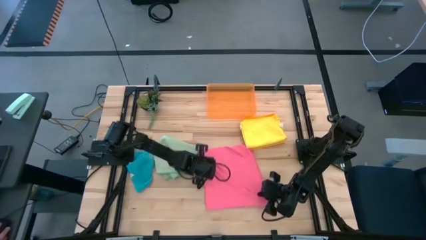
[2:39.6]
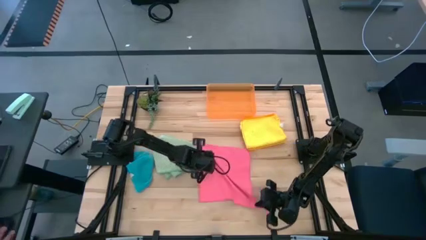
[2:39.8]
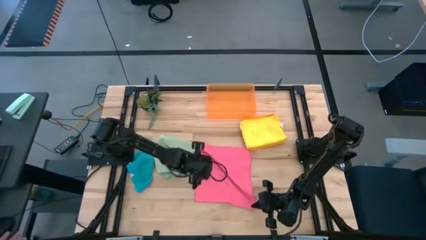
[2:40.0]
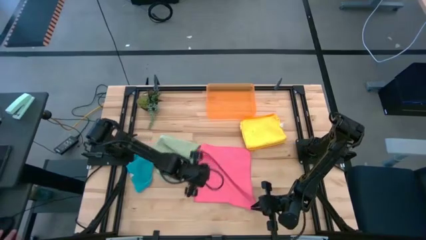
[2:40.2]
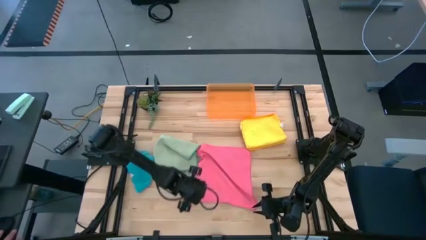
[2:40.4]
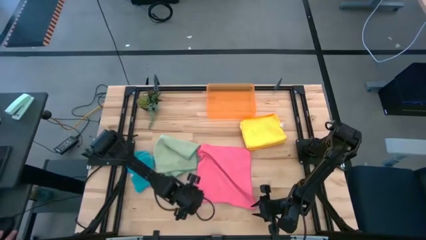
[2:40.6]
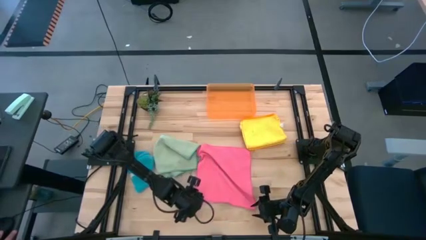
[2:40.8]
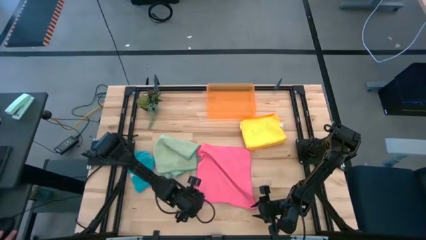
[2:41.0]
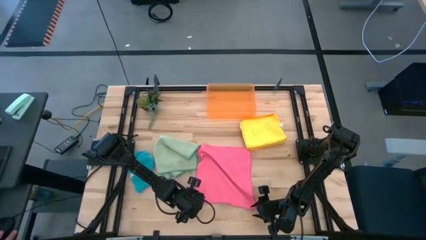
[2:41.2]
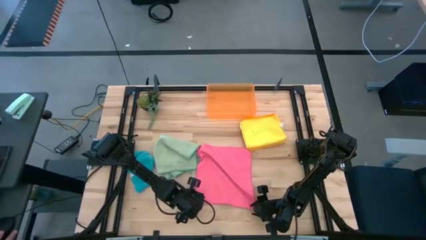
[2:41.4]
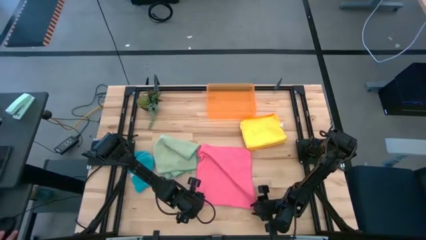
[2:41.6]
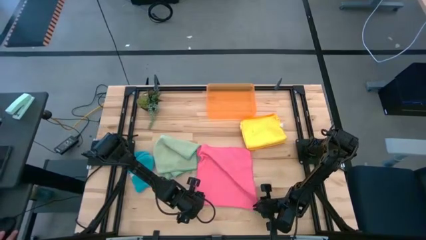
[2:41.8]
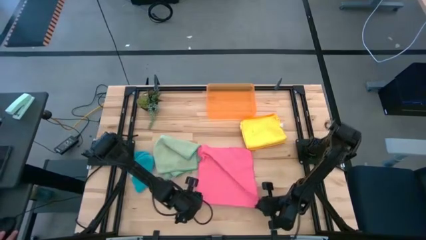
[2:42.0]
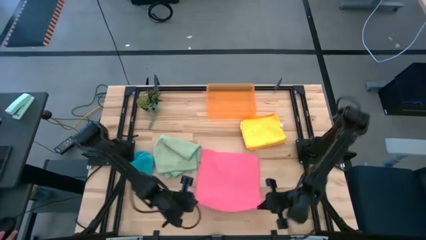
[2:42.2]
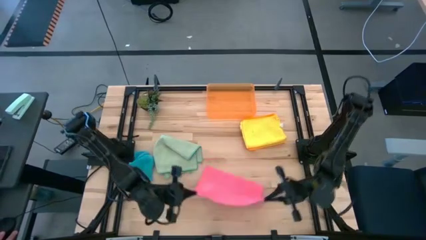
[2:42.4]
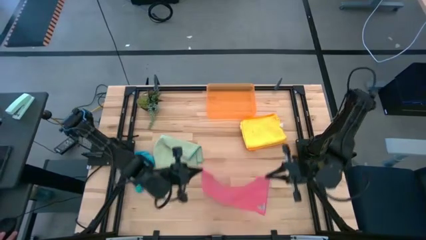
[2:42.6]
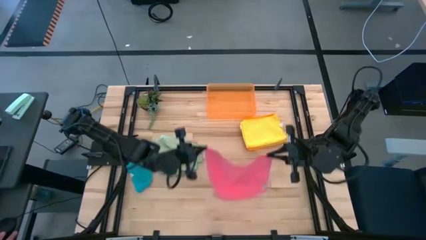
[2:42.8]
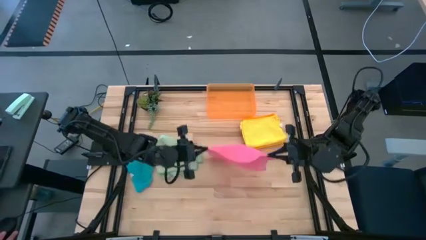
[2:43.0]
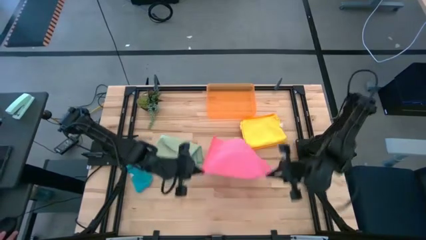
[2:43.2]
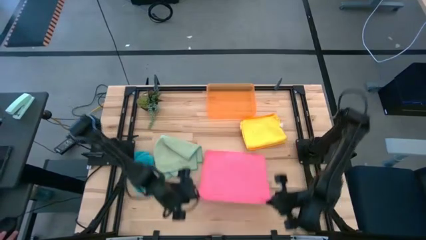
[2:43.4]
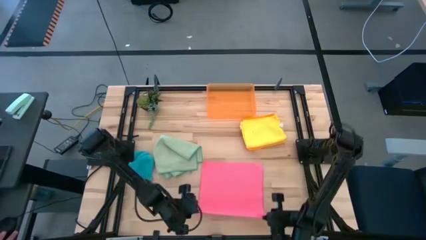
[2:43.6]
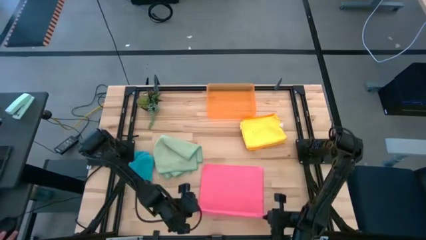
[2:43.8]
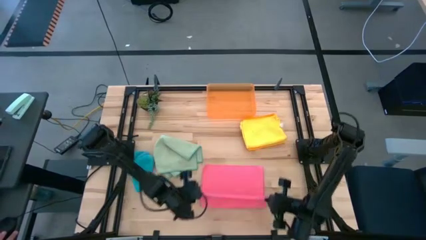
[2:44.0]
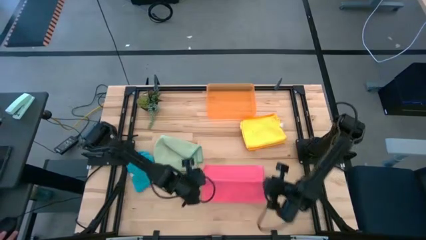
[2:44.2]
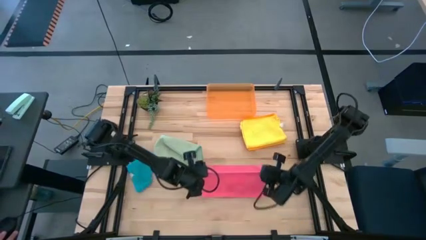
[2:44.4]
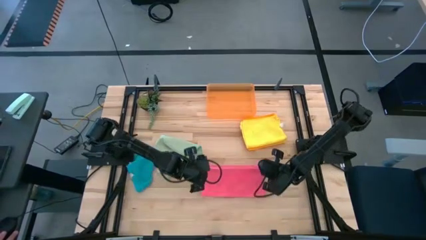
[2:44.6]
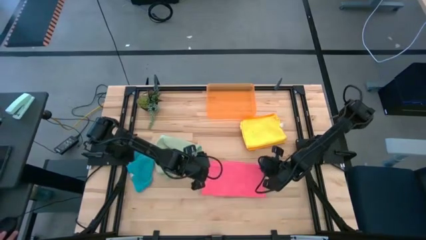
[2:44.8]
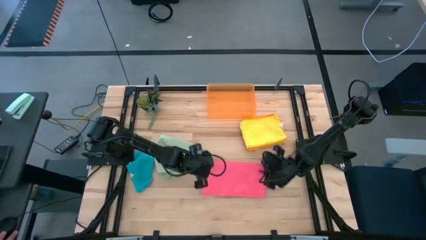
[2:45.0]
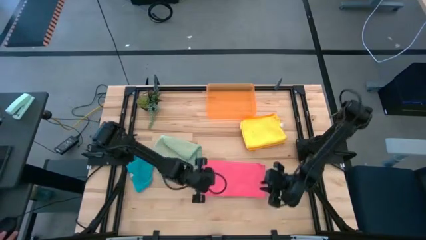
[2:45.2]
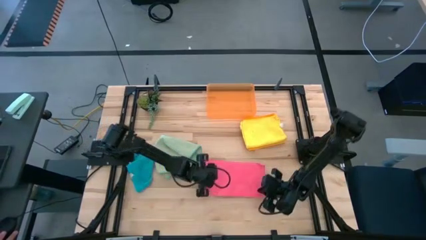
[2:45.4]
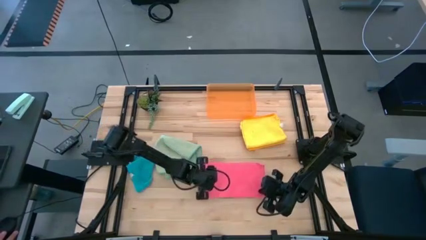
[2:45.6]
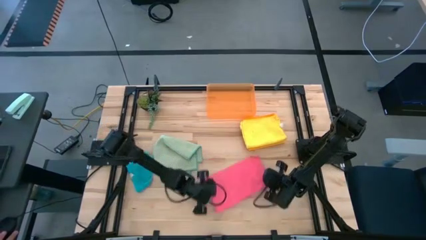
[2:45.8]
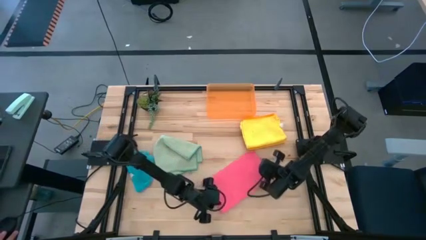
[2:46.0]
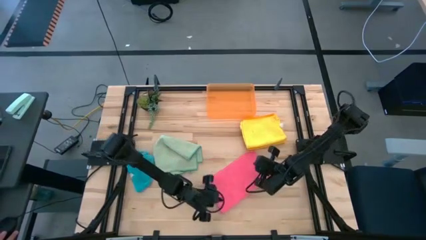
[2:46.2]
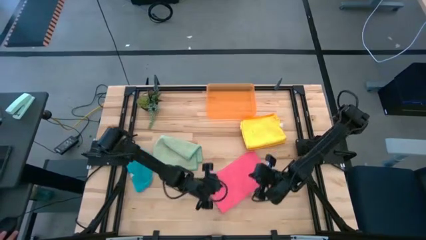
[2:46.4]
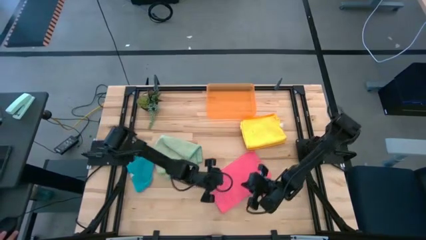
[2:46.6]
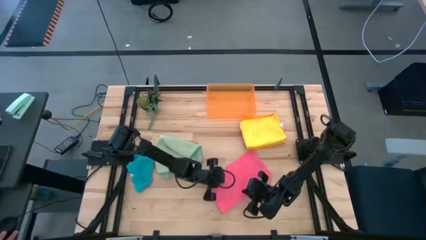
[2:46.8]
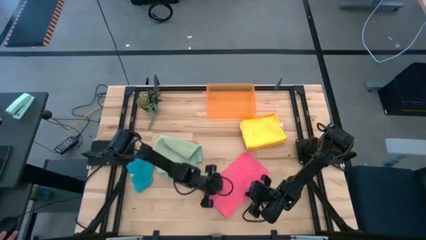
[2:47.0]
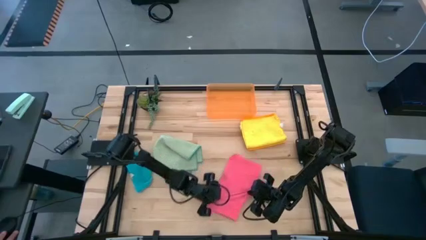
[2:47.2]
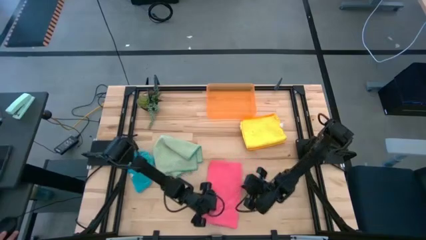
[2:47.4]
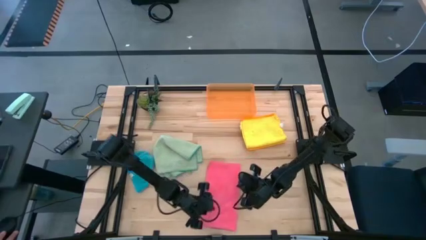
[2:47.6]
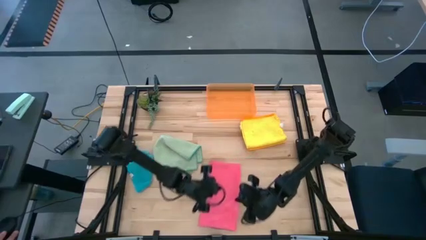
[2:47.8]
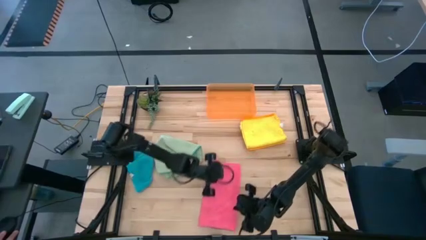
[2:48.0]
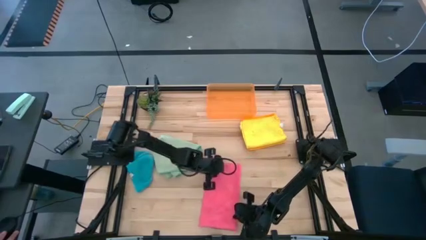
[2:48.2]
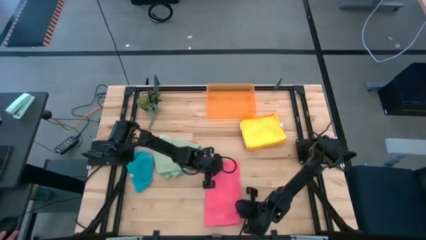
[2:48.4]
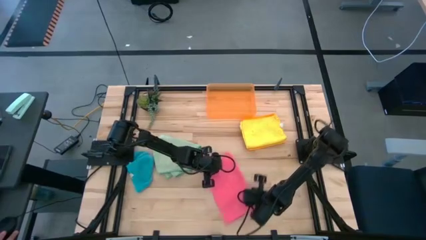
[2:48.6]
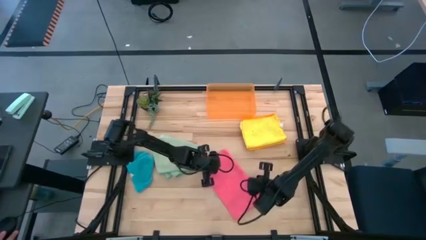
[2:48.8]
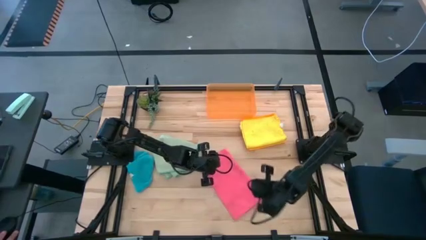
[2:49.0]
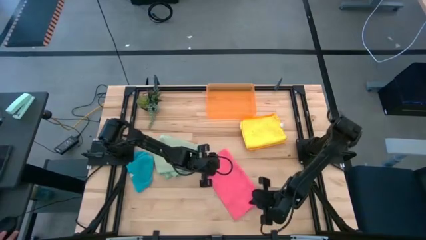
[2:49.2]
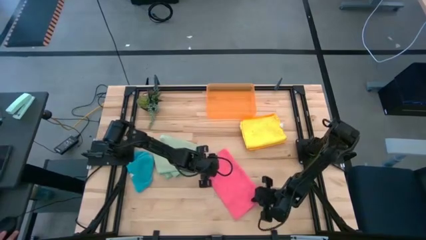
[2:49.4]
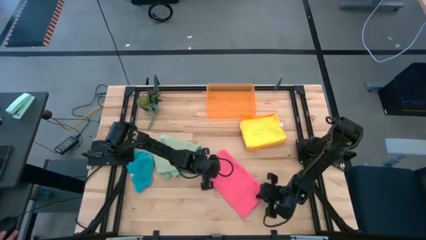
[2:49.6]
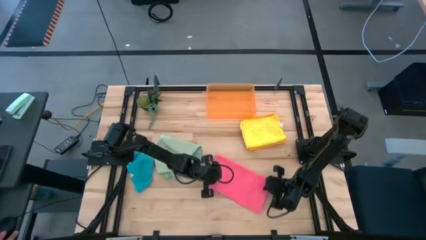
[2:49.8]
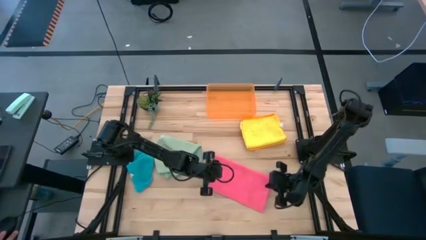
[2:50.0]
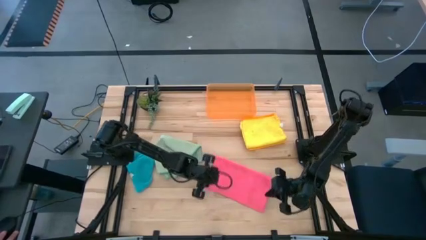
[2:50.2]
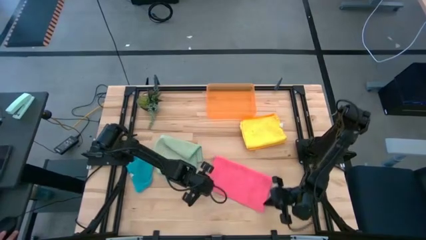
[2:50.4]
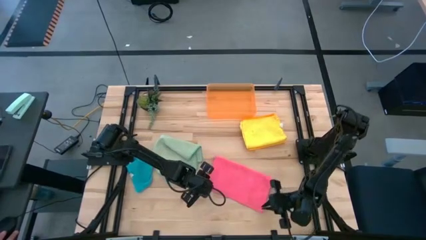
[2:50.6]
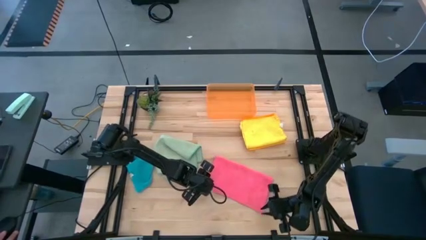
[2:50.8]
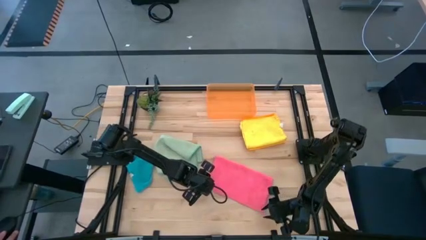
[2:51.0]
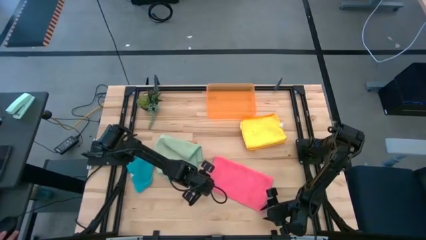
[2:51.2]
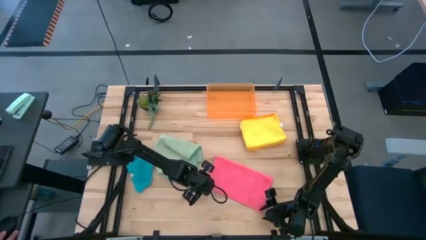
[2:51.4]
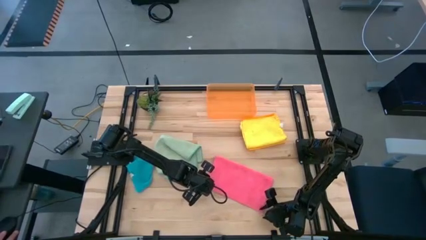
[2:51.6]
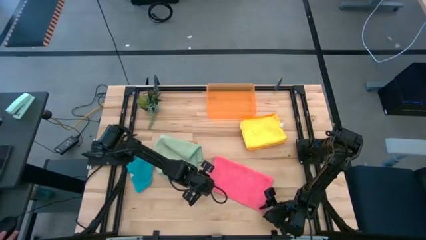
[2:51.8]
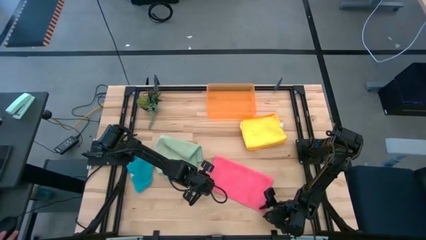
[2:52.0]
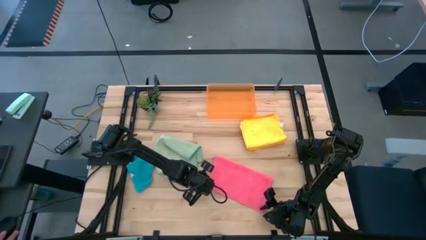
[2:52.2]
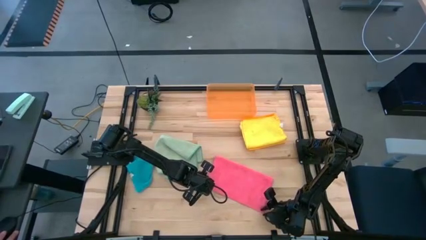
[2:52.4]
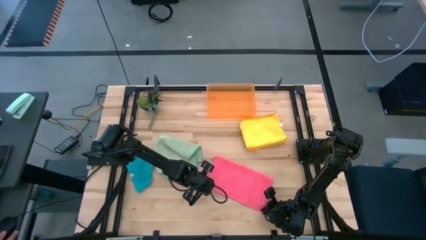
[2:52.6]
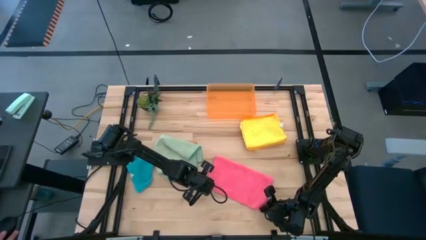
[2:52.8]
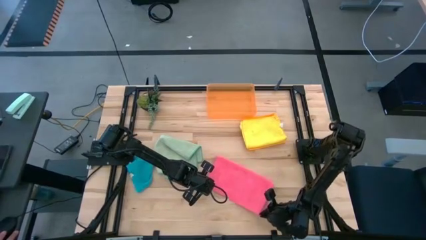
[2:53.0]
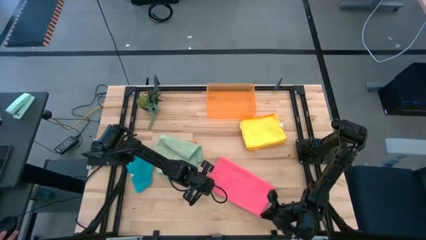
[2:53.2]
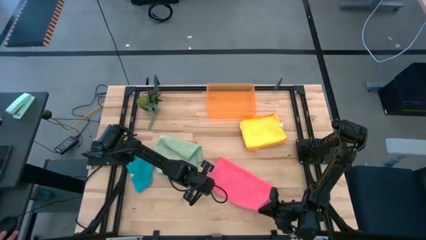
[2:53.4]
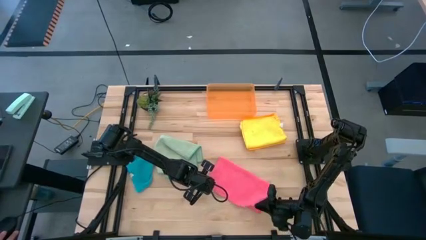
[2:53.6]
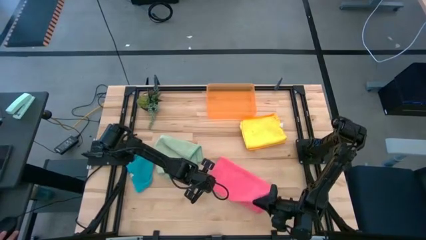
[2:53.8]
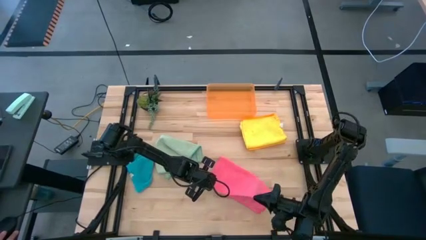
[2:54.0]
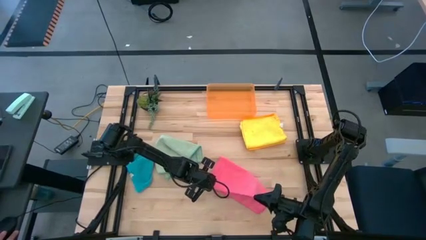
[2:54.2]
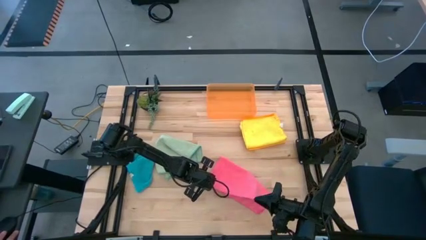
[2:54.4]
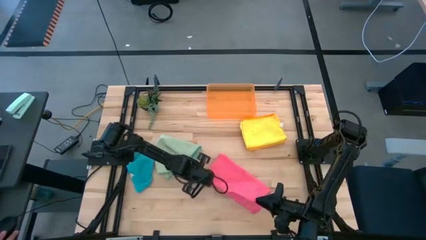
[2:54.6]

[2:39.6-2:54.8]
Task: Fold microfiber towels
Fold the pink microfiber cloth

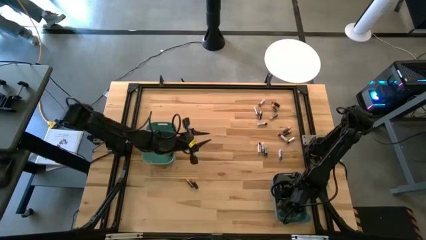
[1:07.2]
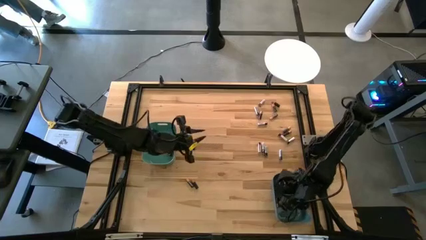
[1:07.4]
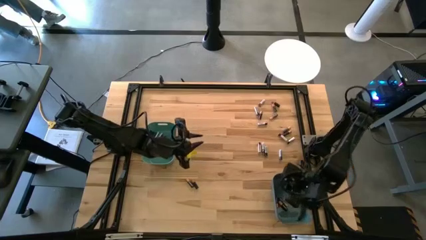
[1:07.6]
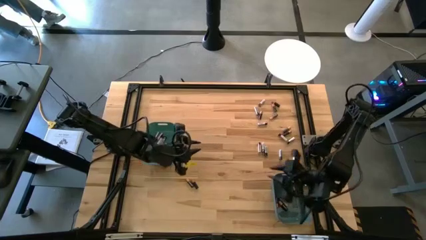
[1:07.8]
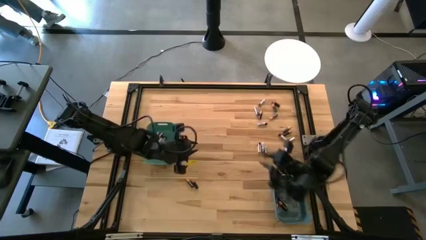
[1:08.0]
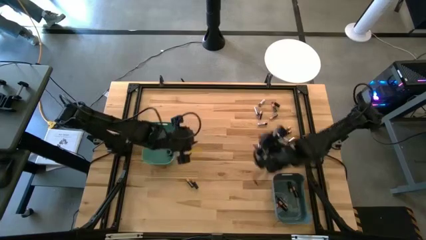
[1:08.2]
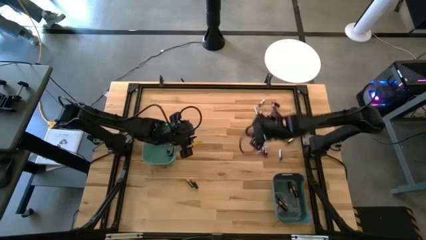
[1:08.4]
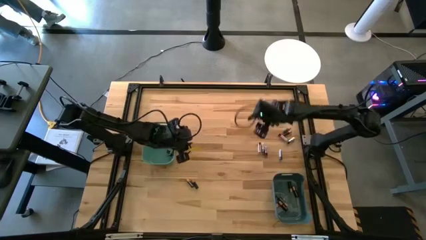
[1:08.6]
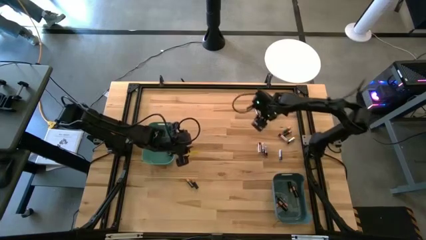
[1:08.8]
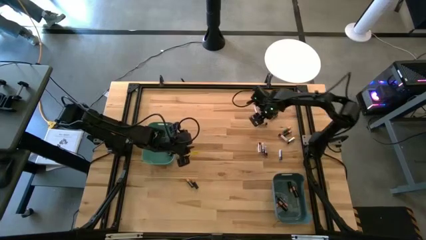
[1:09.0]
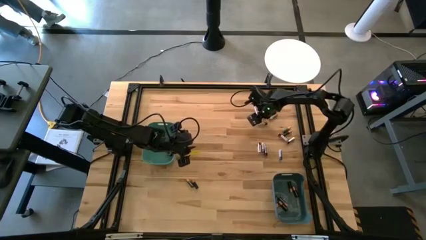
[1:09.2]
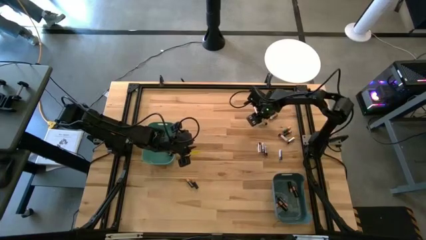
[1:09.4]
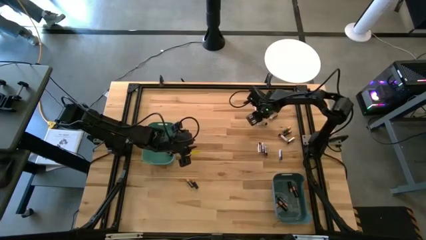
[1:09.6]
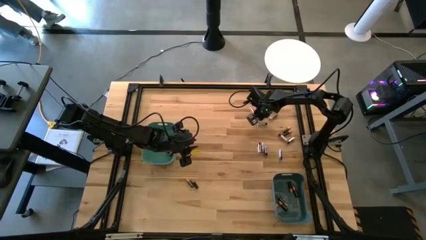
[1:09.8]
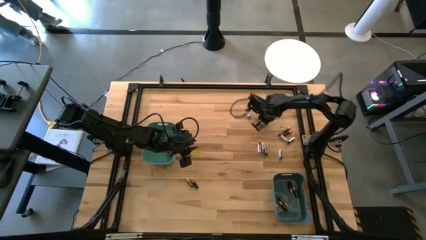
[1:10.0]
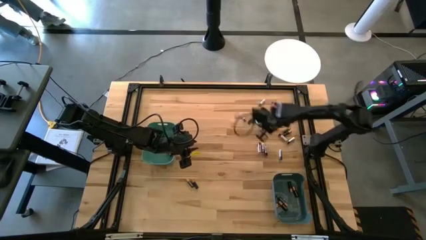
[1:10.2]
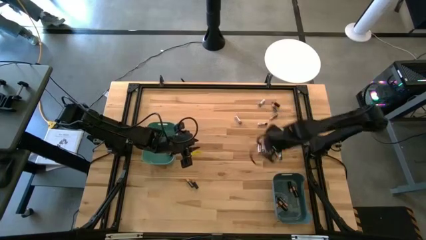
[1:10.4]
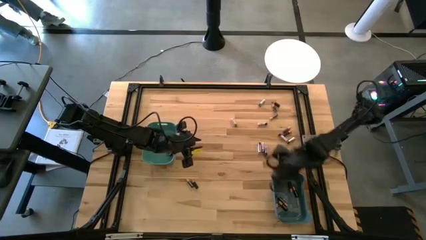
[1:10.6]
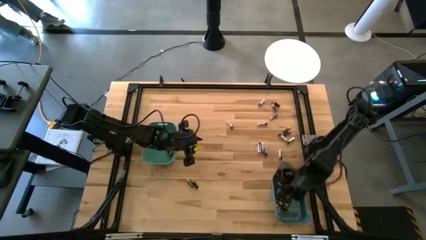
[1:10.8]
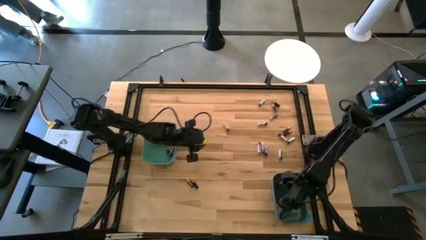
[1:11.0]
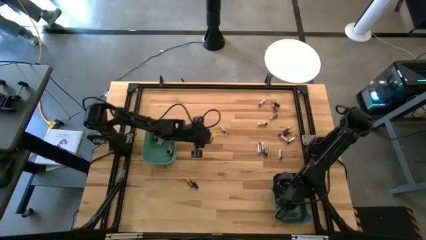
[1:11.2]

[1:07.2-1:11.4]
Task: Sort batteries
Put the black battery into the blue bin
